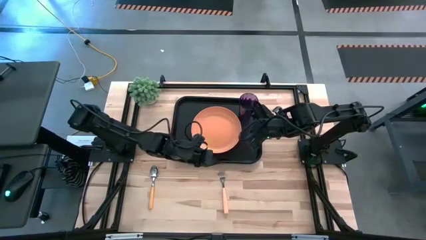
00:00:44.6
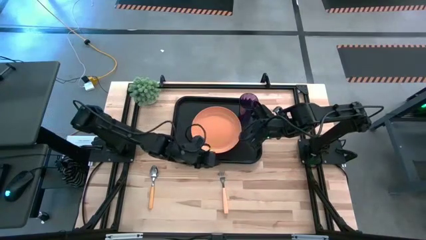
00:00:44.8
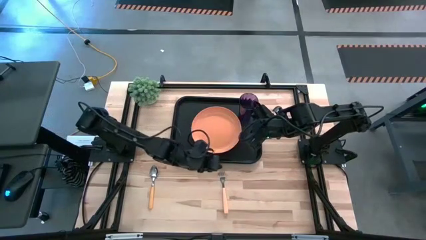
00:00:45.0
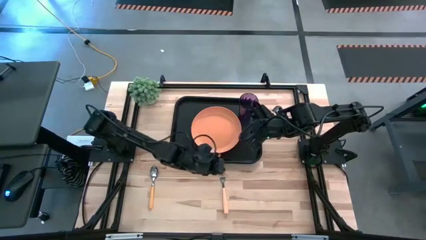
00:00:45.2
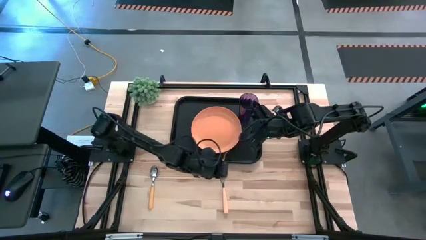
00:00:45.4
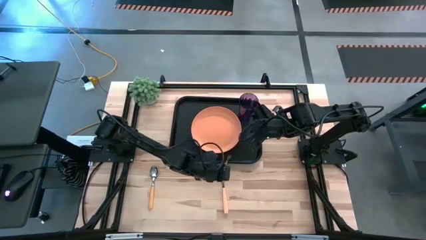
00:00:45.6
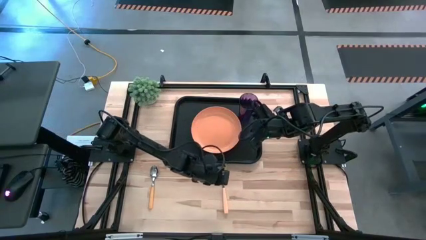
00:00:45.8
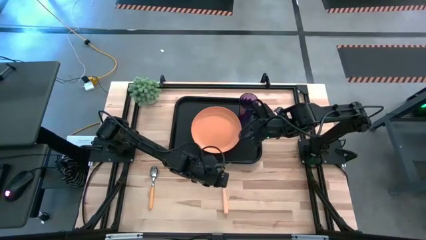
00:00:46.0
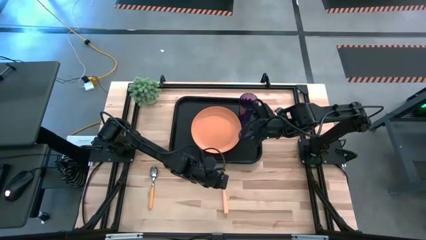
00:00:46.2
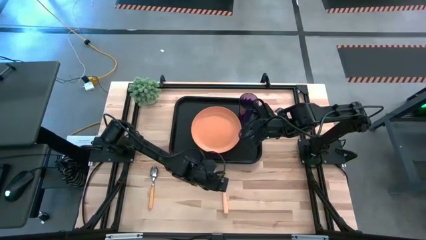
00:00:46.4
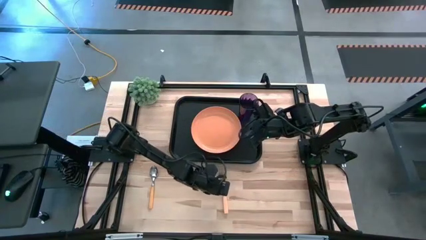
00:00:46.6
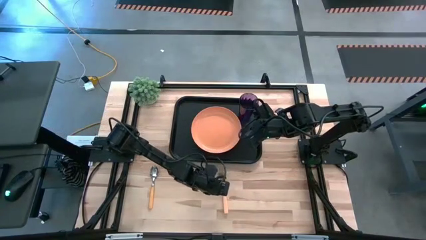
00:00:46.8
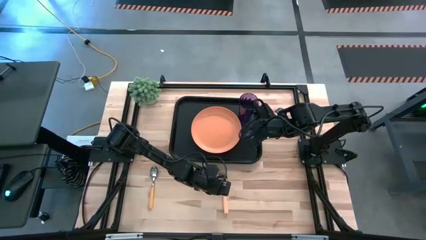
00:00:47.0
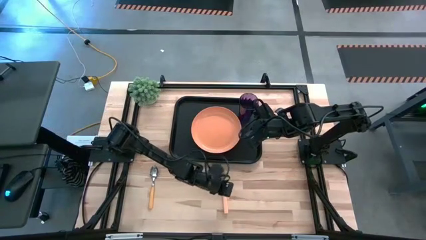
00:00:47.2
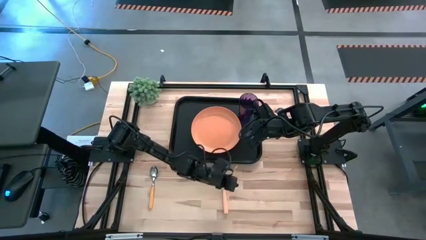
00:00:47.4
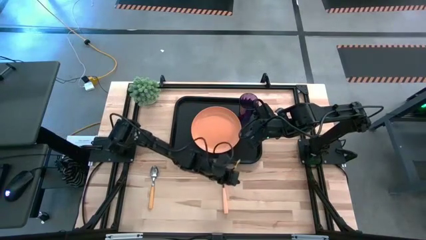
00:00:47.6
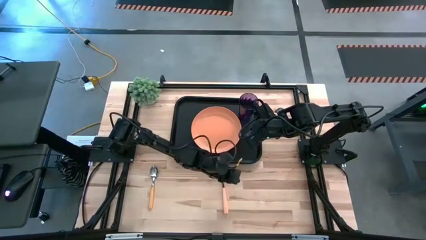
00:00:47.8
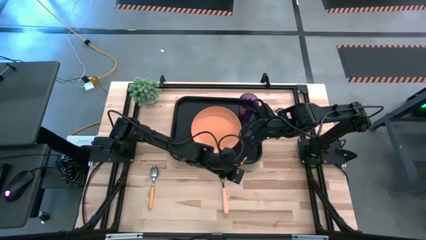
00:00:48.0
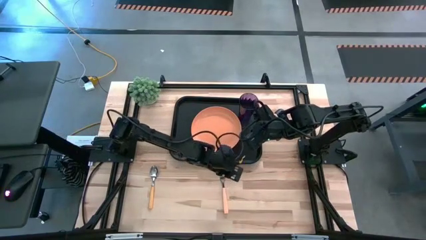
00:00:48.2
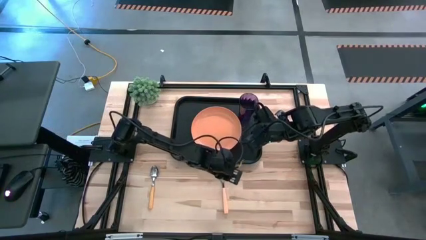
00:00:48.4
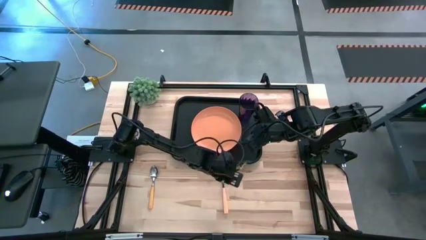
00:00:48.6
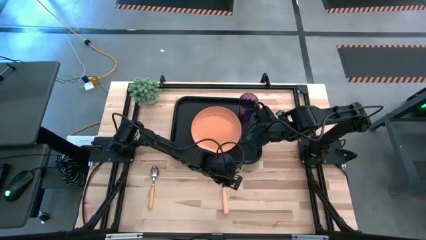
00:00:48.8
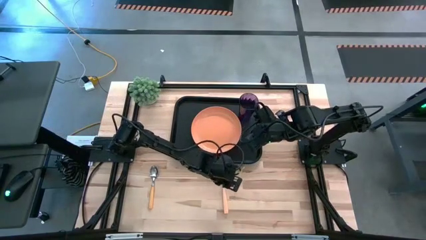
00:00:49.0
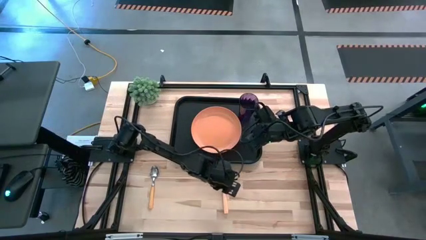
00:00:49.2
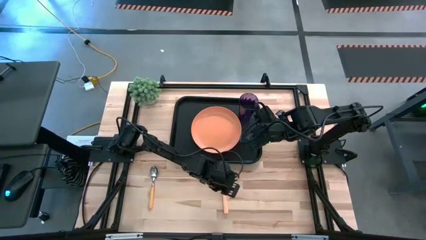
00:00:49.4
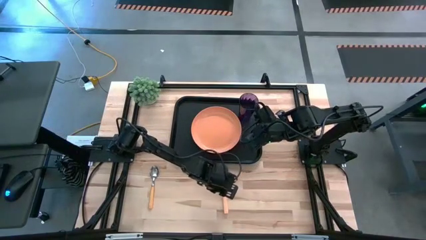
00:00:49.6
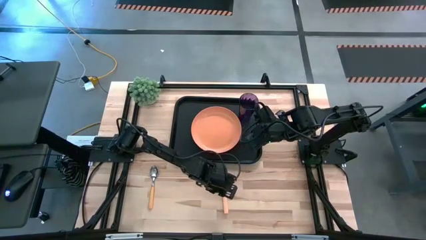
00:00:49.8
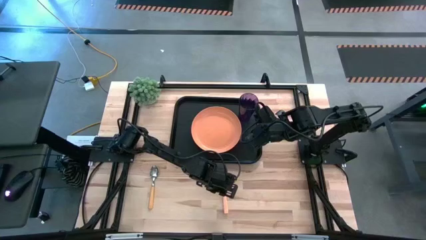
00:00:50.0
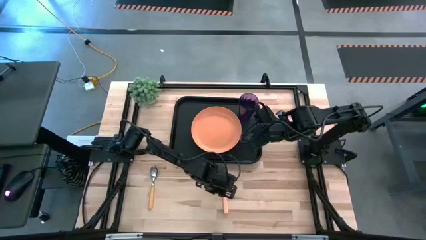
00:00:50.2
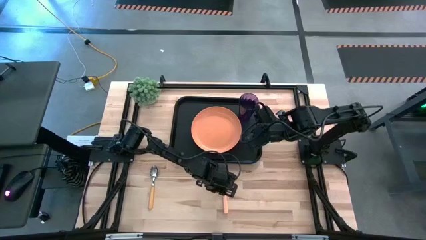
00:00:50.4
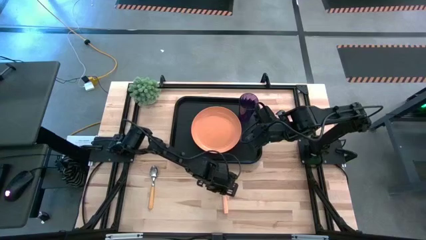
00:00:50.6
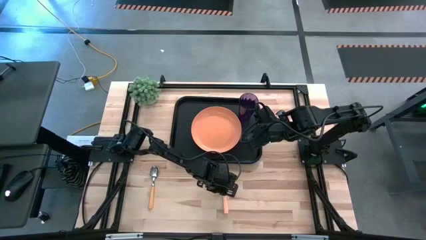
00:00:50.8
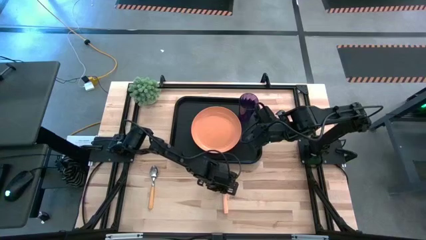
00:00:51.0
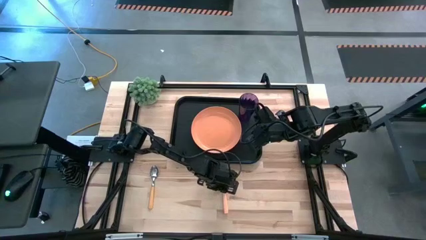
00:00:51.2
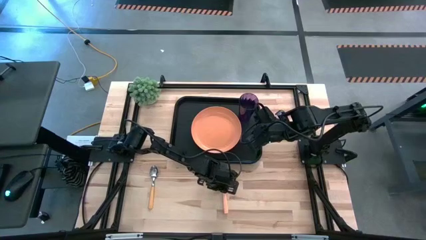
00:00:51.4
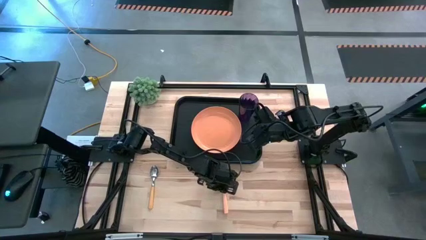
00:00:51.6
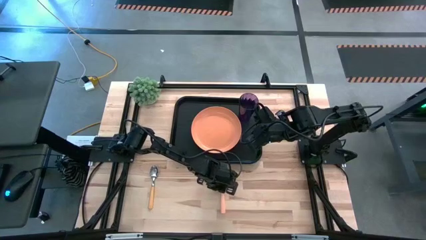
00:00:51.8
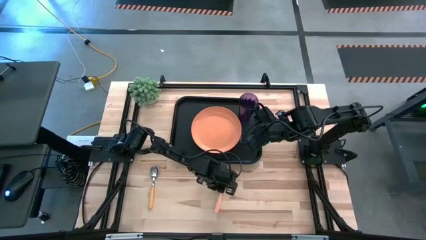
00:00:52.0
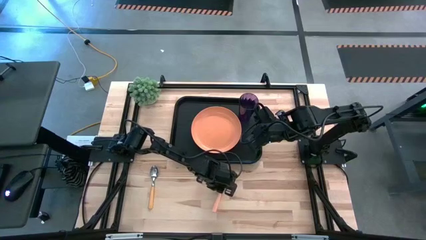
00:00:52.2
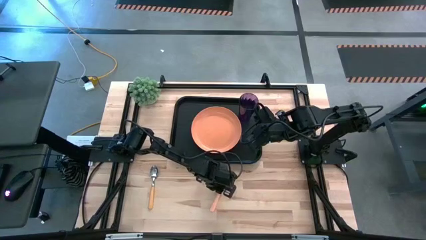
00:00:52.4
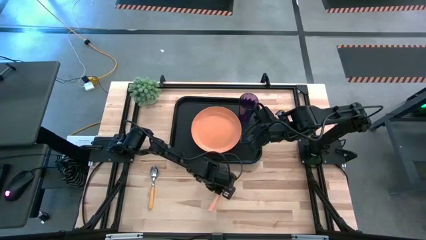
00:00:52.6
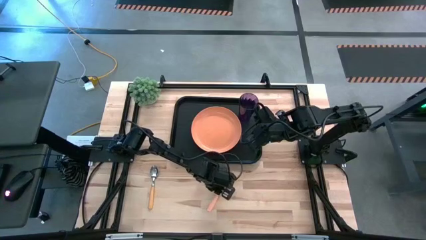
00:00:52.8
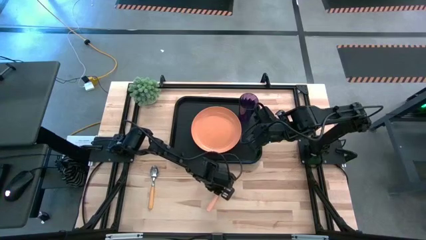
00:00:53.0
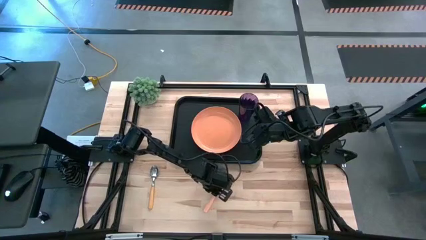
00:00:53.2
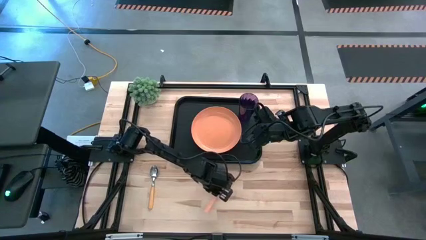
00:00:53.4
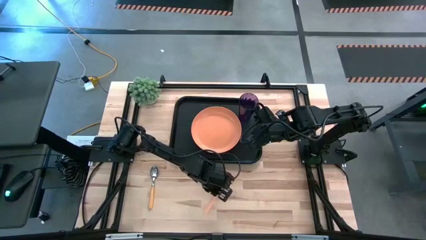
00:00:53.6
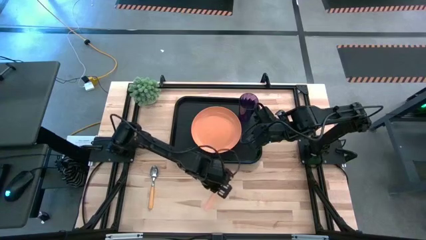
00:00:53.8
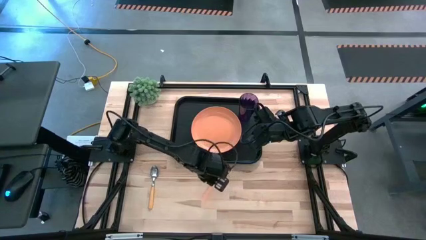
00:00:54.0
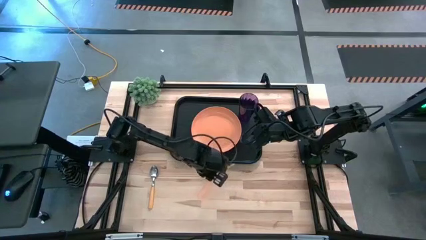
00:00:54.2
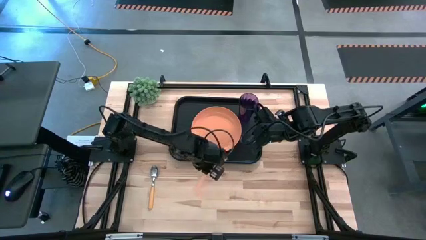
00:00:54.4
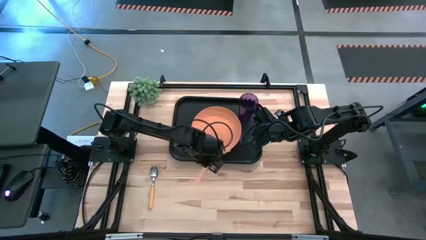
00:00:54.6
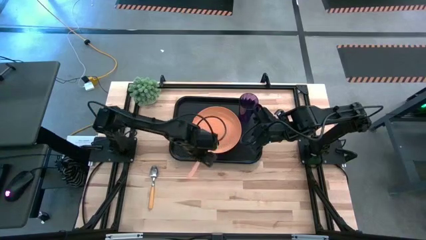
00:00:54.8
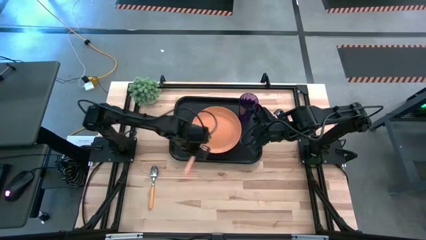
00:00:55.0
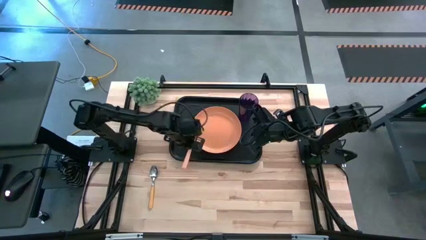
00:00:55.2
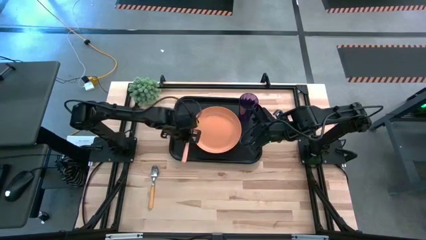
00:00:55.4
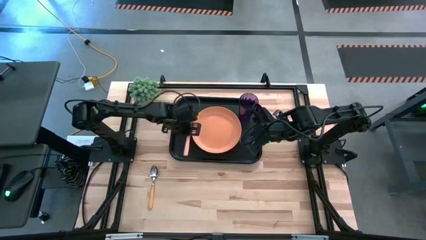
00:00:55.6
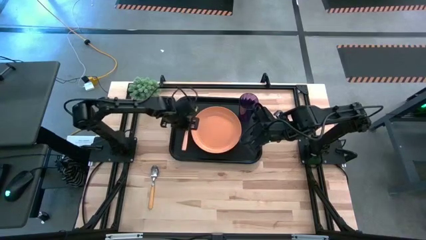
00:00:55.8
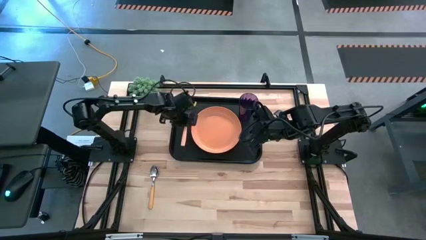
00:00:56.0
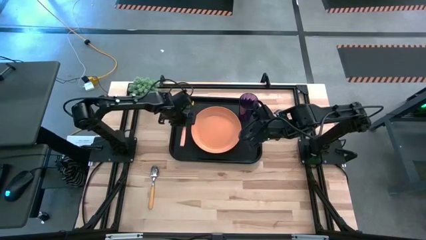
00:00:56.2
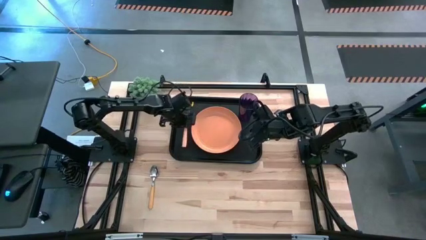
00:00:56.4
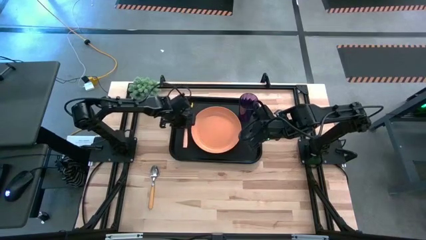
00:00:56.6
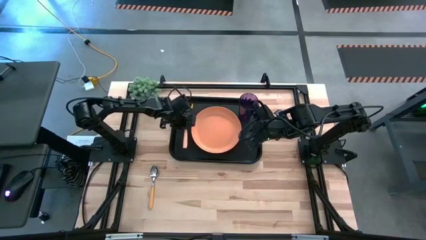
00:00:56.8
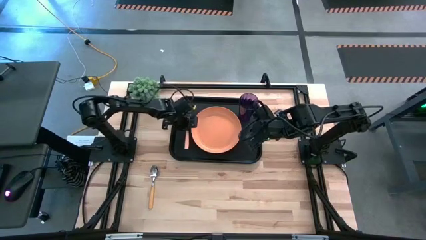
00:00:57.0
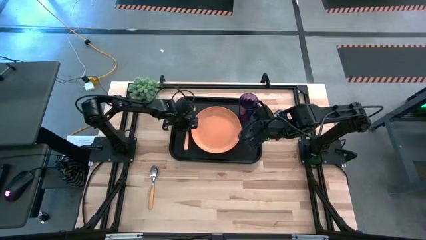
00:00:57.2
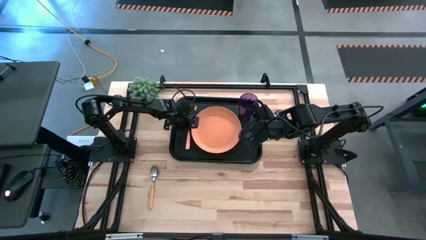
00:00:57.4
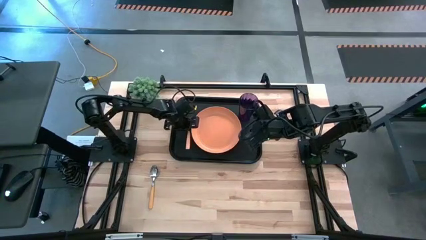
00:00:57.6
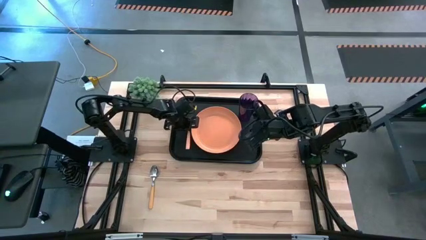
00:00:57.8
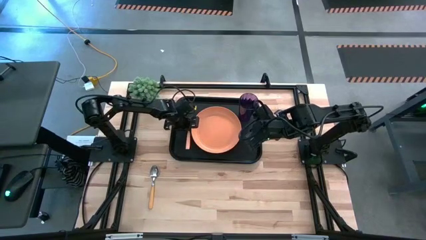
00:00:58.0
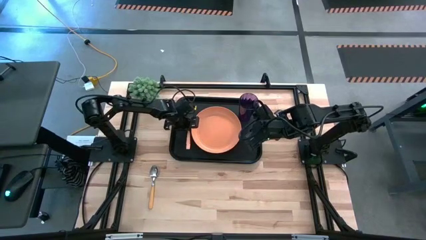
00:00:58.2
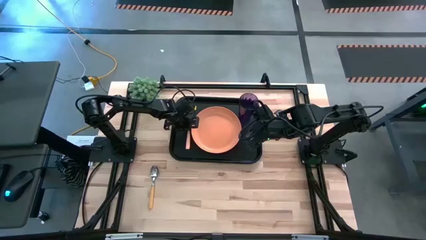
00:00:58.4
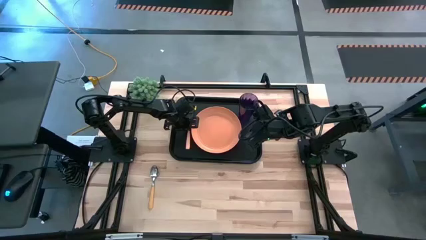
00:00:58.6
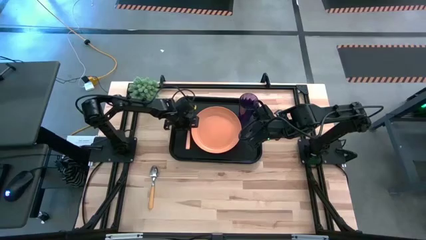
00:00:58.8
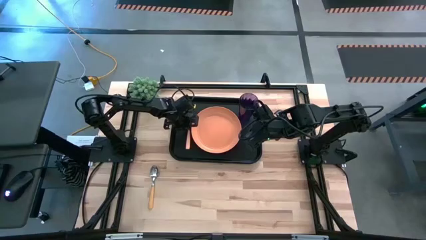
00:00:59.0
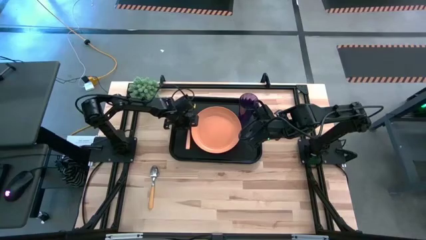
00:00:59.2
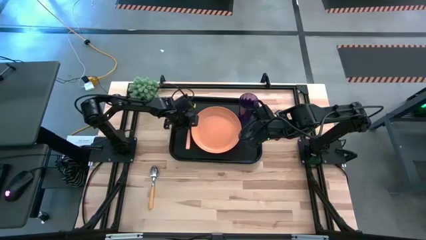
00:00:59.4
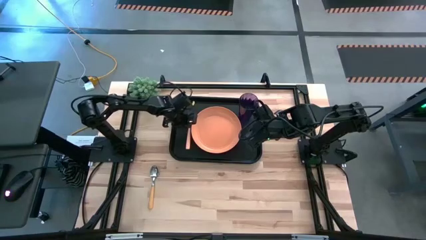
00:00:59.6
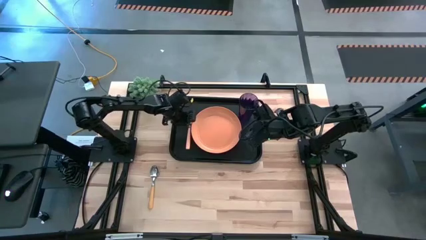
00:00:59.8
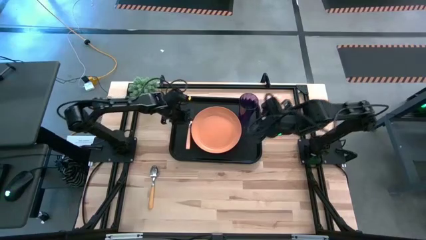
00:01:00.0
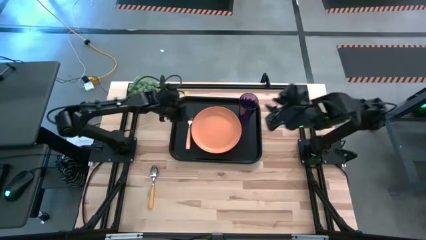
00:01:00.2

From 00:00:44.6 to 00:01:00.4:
Task: Pick and place plate/cup/fork/spoon on tray
Put the orange fork on the black tray to the left of the orange plate

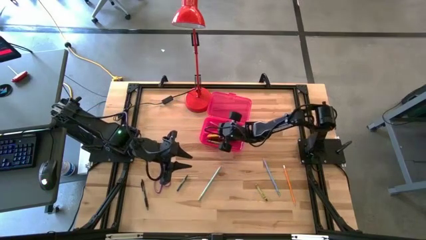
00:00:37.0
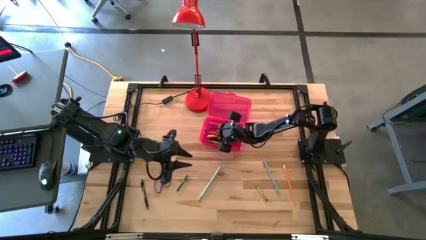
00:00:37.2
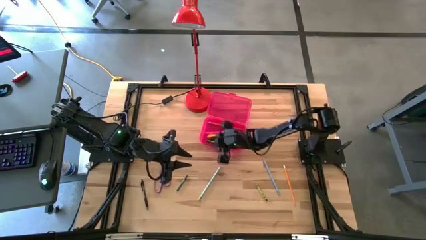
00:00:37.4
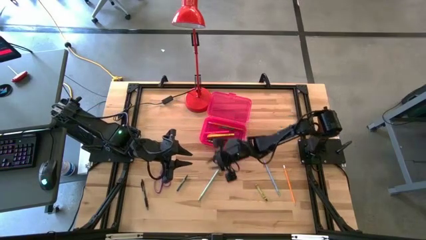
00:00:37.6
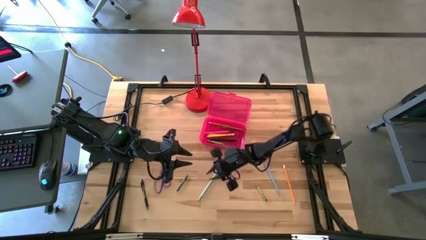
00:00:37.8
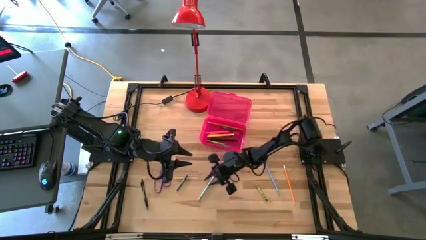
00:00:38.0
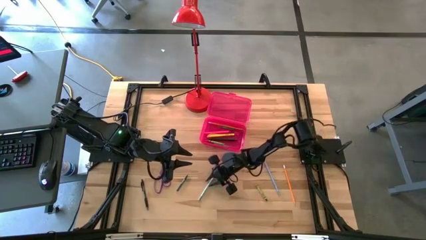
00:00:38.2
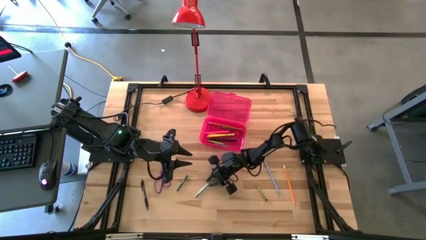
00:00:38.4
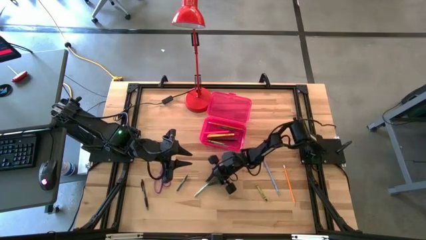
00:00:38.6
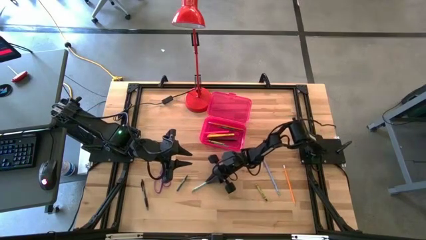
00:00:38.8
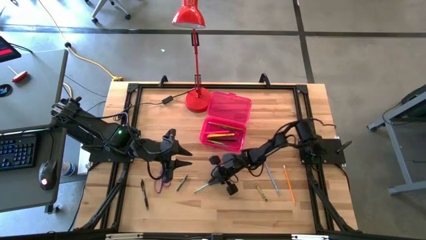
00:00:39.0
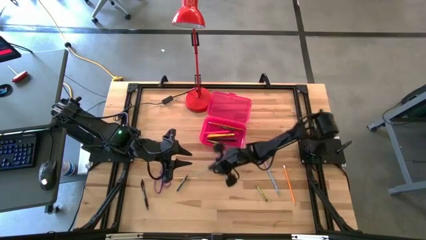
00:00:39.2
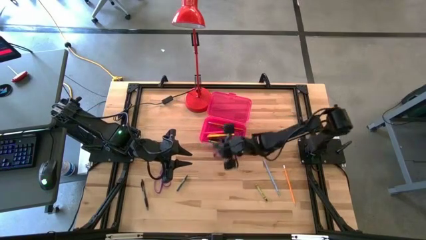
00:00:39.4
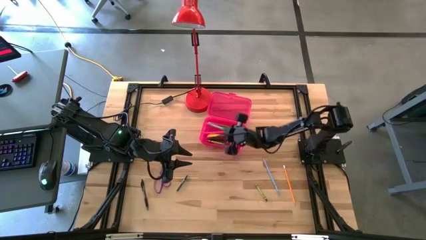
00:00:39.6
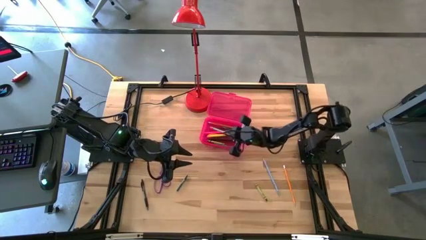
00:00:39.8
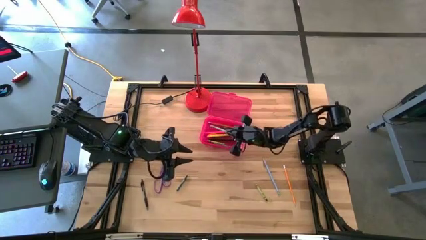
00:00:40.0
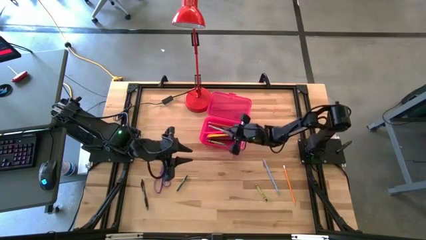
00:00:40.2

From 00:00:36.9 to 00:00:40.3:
Task: Pick & place school supplies into a supply box
Put the blue pencil into the pink supply box
